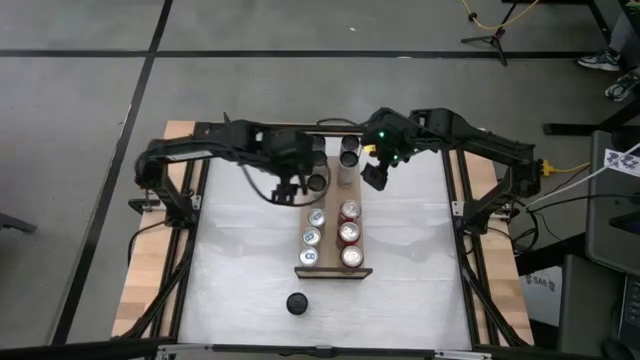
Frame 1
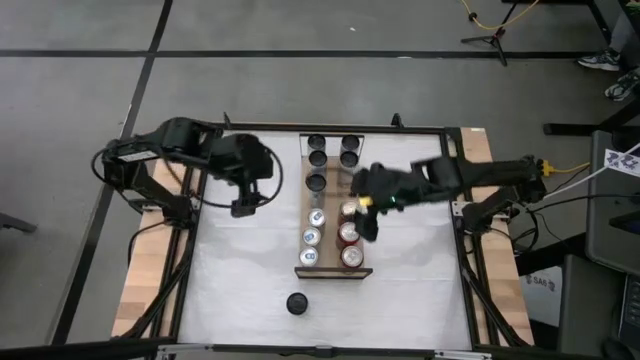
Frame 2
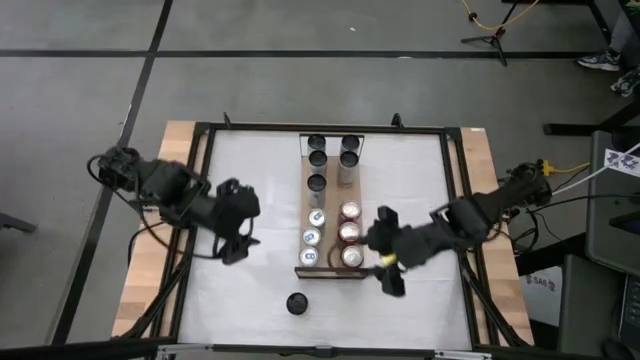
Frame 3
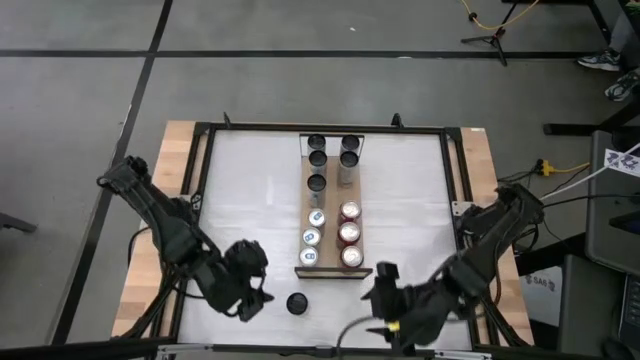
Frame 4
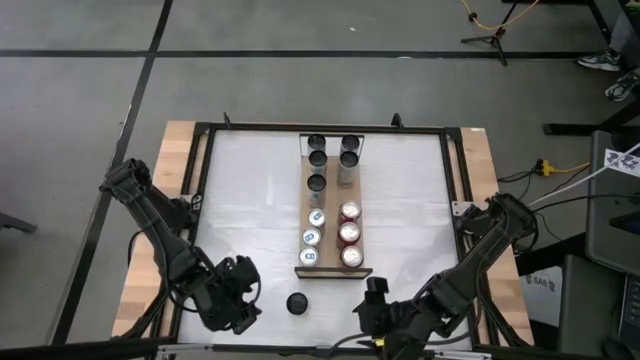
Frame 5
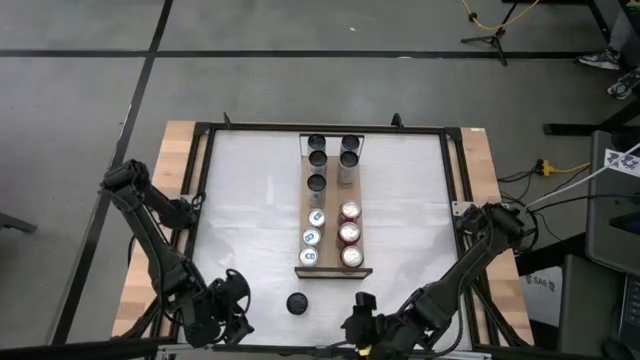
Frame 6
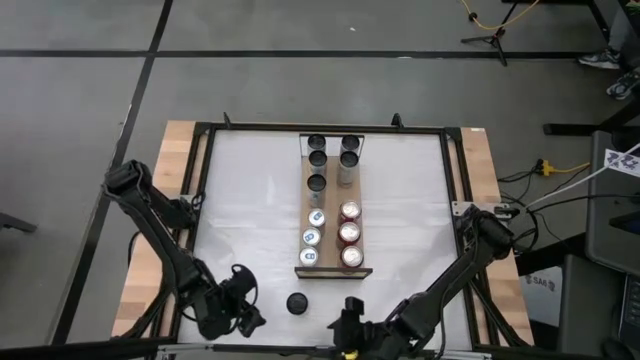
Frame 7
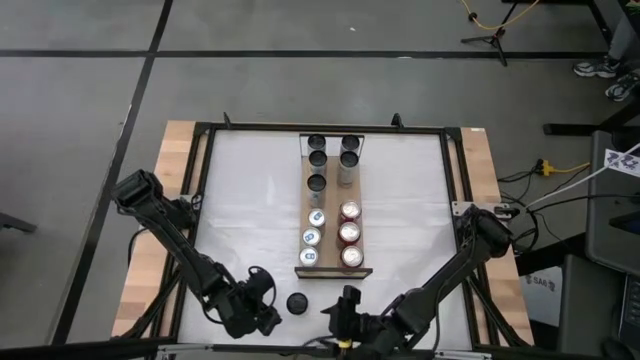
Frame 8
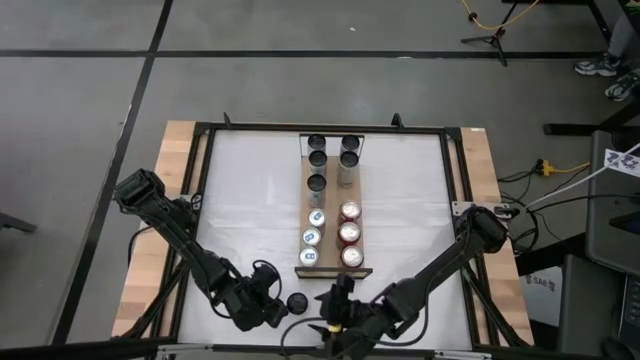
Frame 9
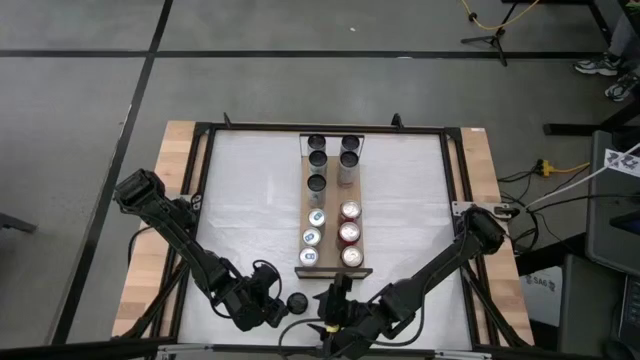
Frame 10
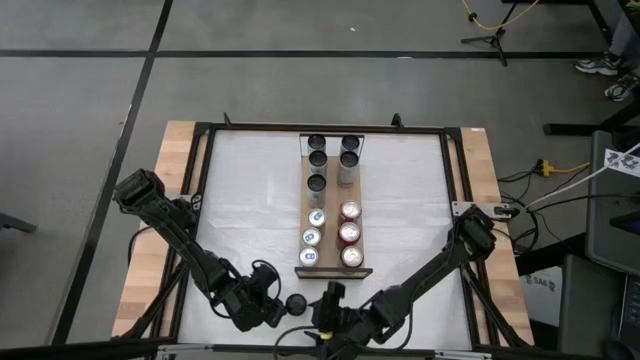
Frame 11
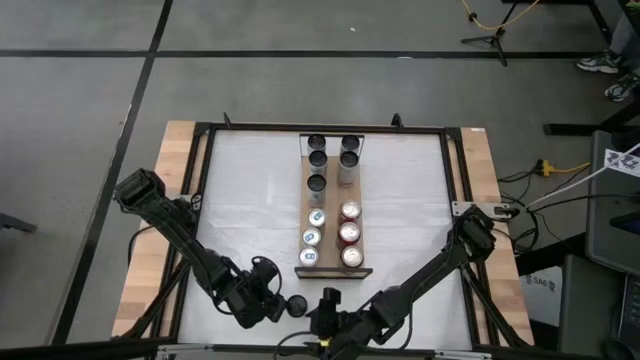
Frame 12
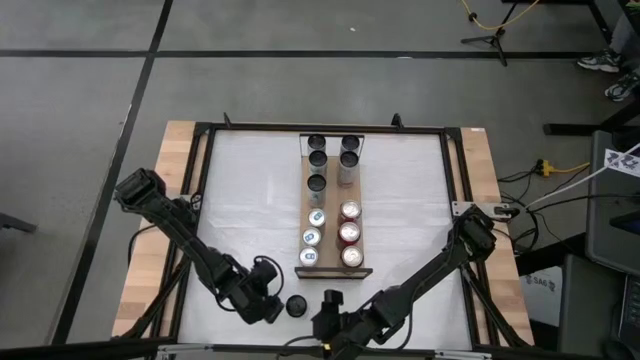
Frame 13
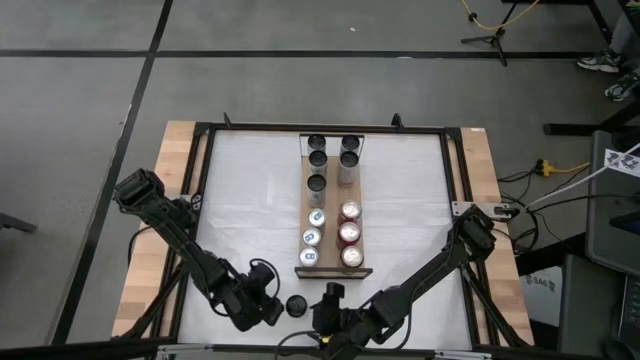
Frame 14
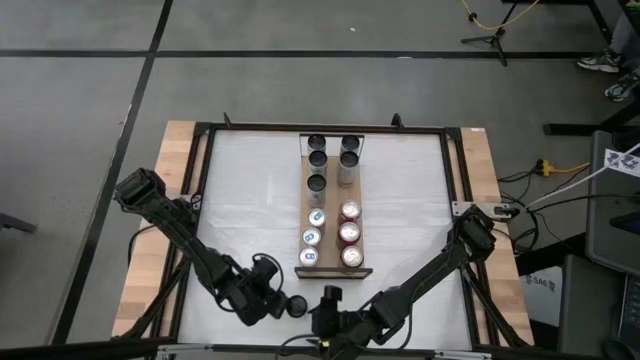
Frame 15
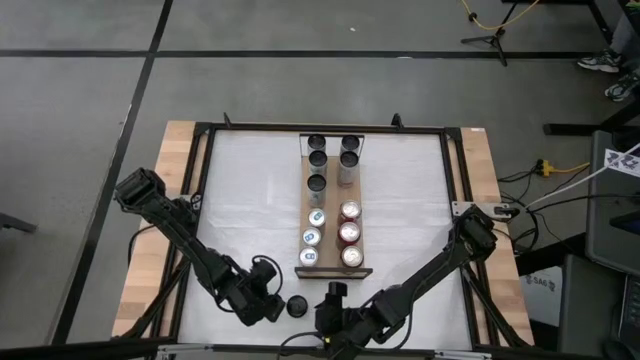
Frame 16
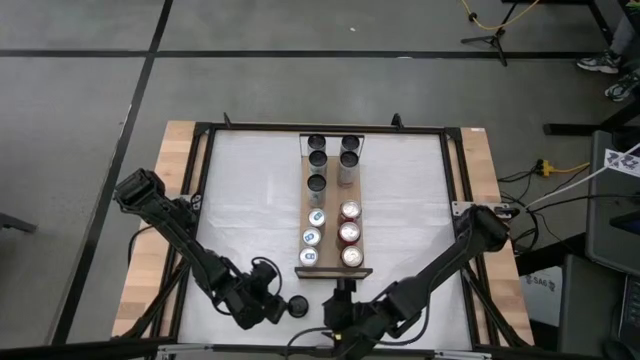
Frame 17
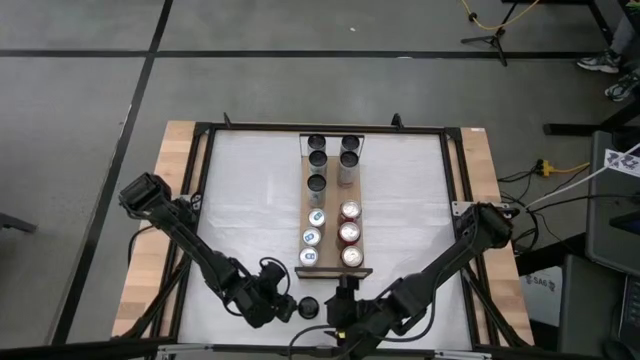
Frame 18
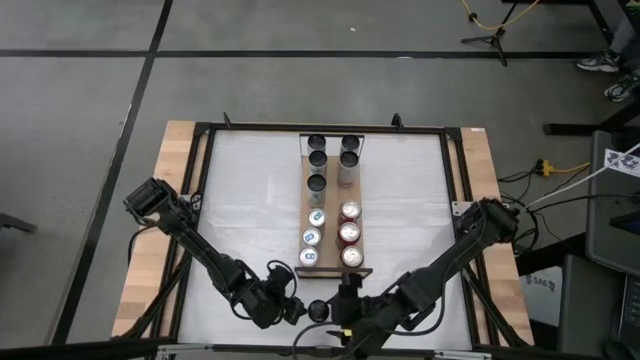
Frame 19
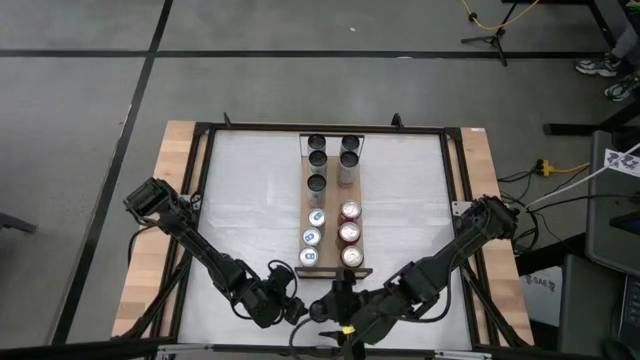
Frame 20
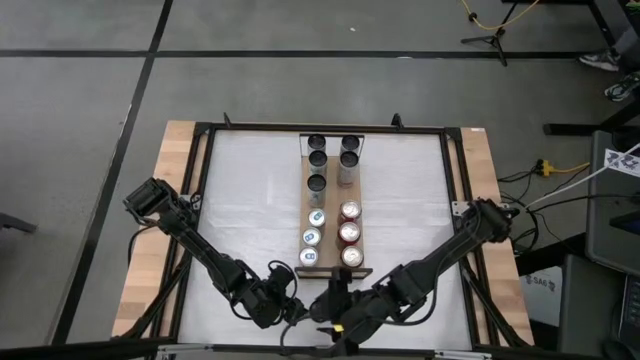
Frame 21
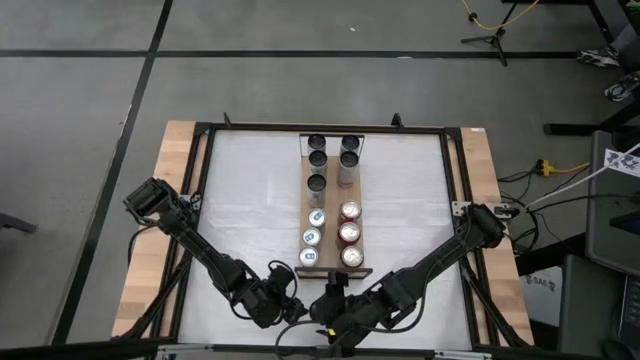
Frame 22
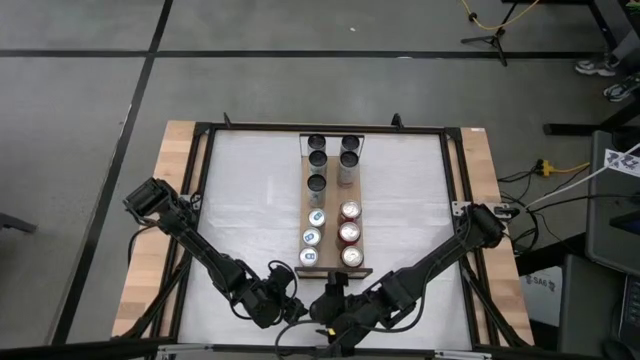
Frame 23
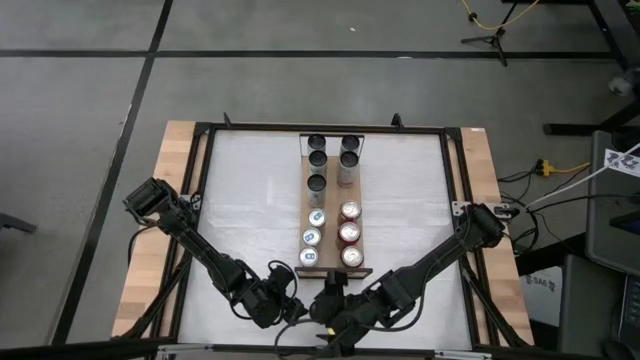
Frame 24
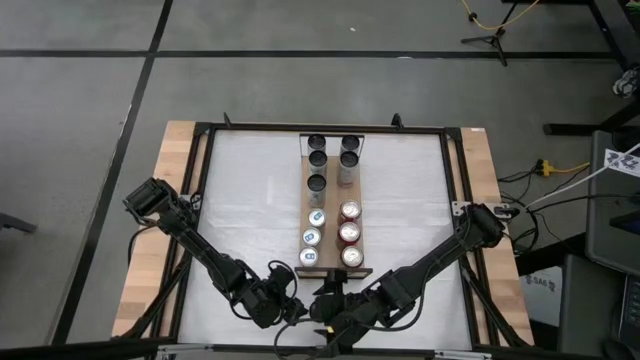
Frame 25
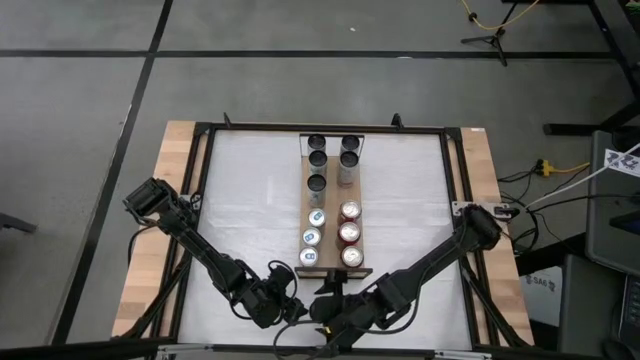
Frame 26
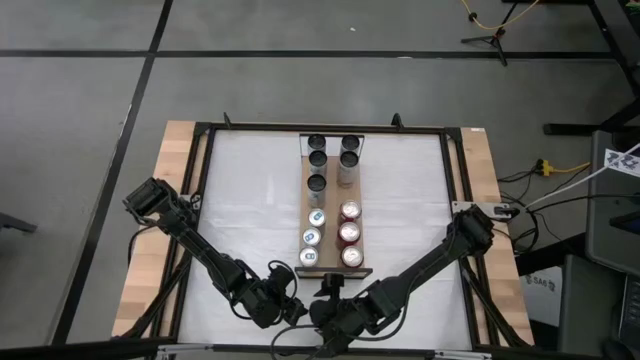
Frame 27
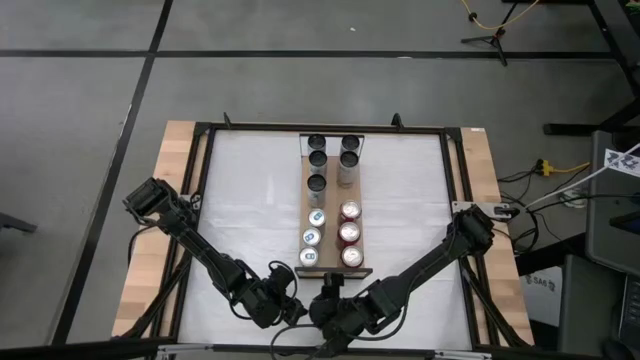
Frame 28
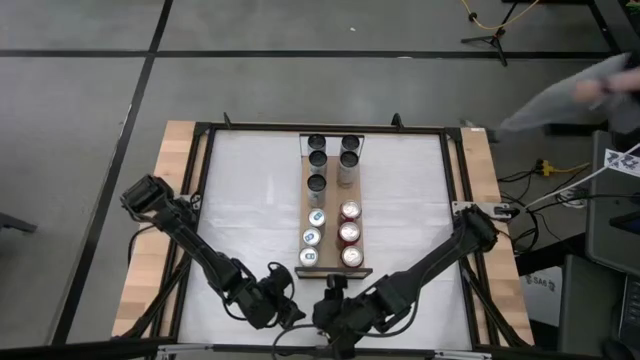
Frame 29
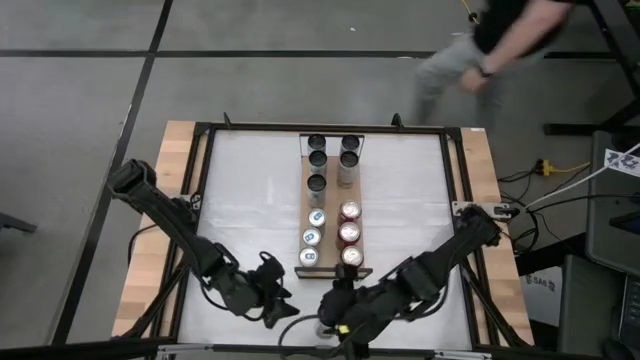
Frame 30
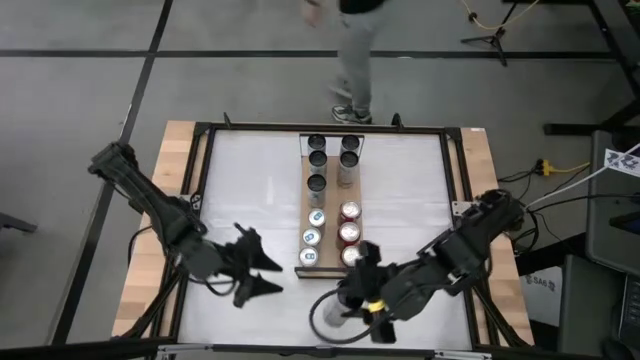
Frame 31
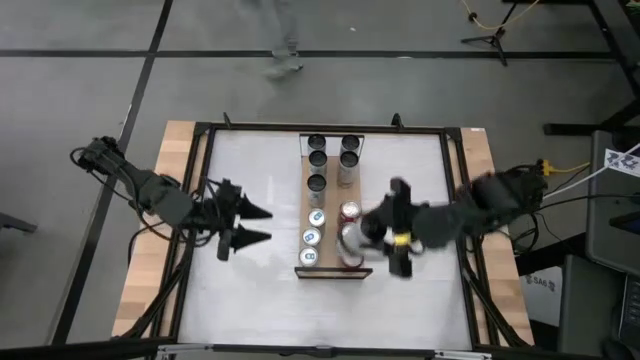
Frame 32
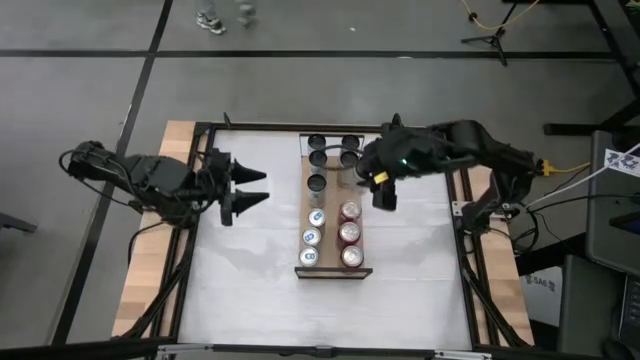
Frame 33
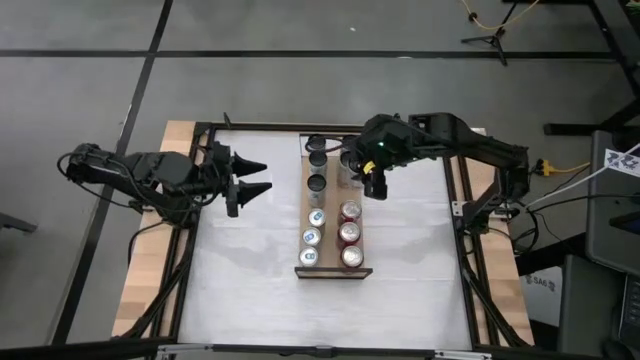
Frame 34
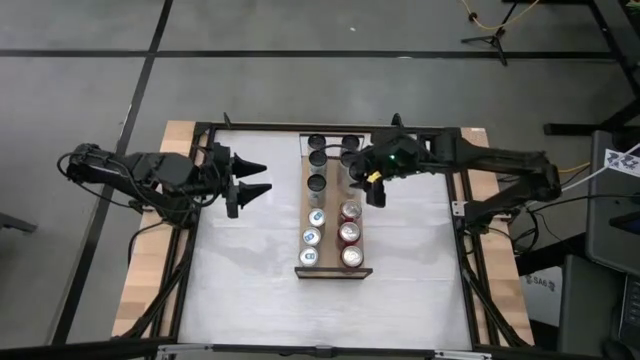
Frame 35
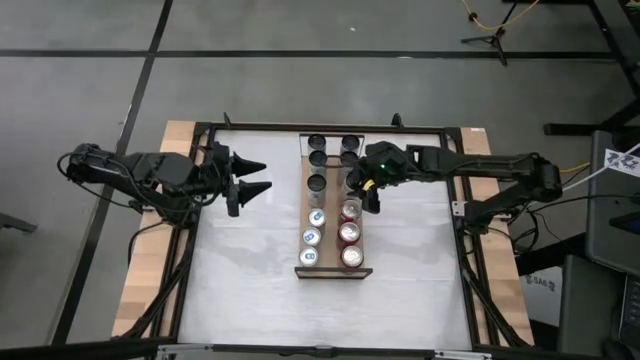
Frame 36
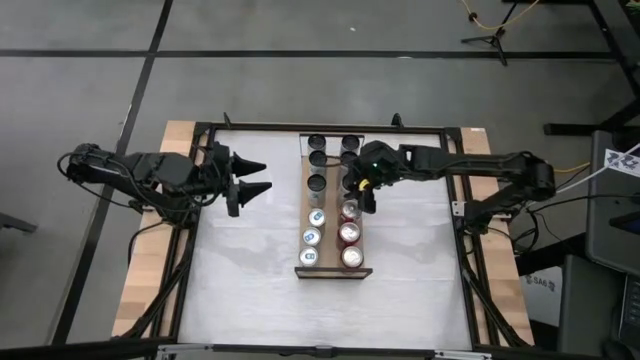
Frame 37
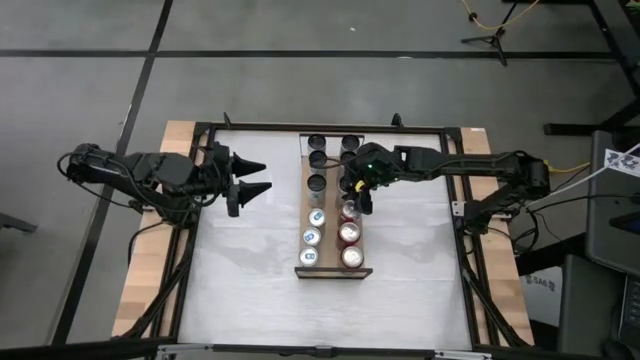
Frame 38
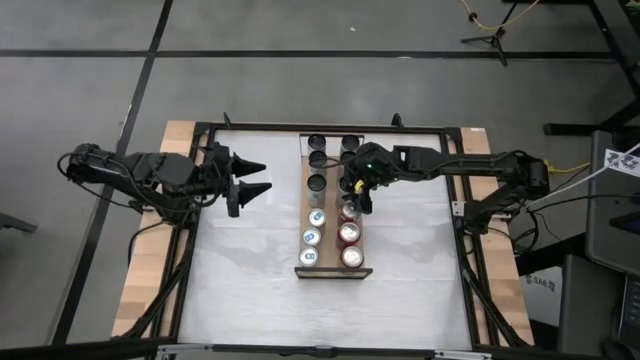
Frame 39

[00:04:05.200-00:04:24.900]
Task: Place canned beverage on shelf
Put the white pink soda can on the shelf aligned with the other white pink soda can

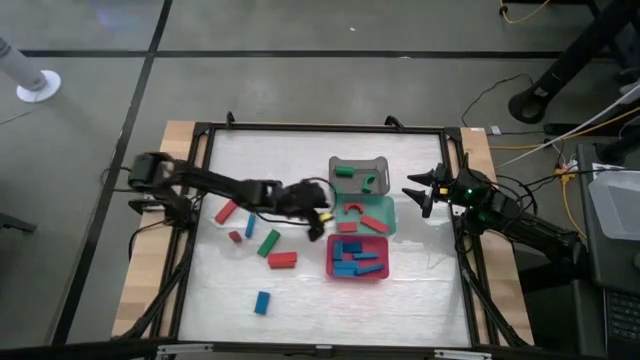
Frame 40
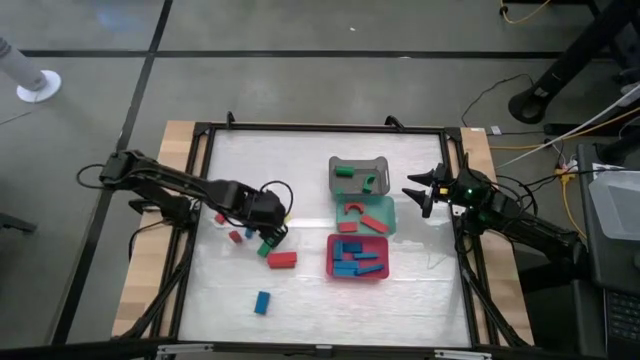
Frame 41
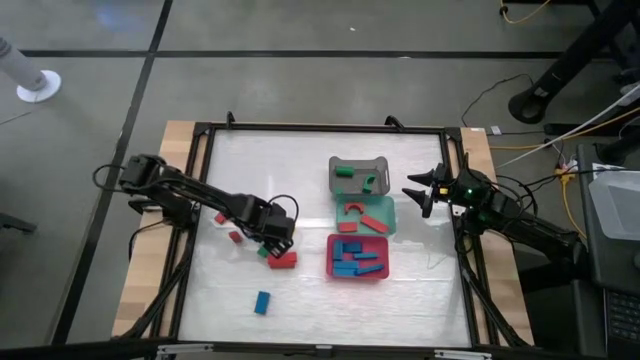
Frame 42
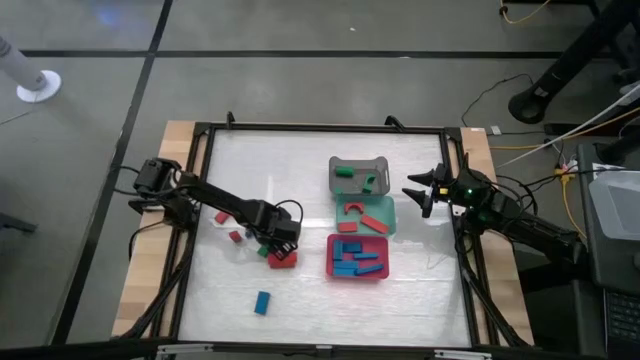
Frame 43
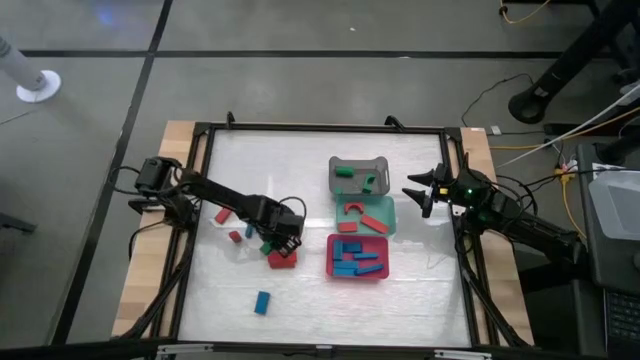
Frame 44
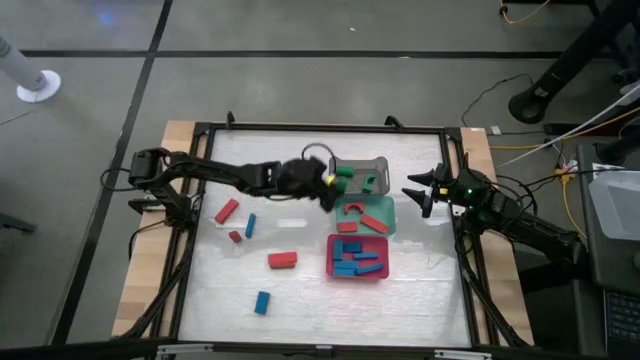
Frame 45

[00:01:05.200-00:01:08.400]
Task: Sort blocks
Put the green block into the black bin
